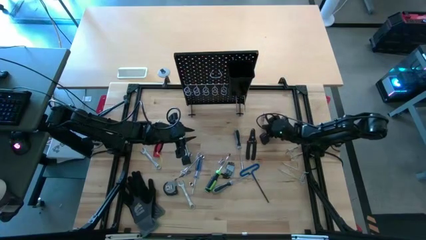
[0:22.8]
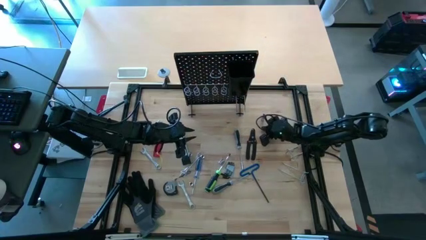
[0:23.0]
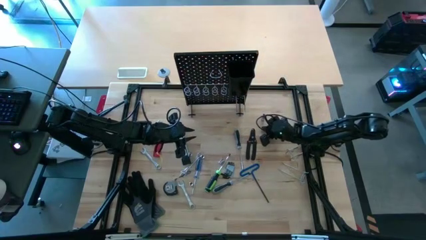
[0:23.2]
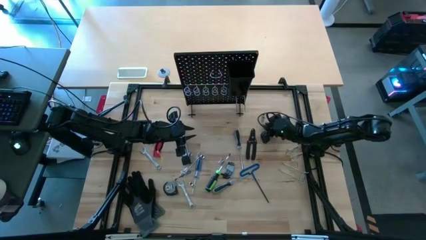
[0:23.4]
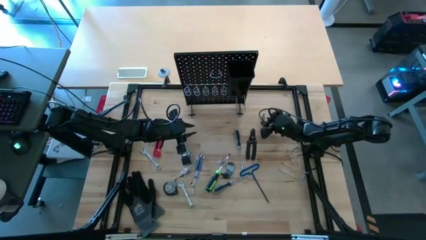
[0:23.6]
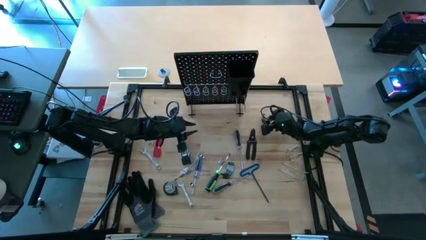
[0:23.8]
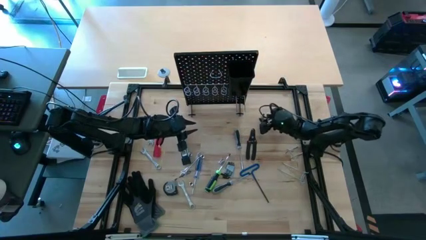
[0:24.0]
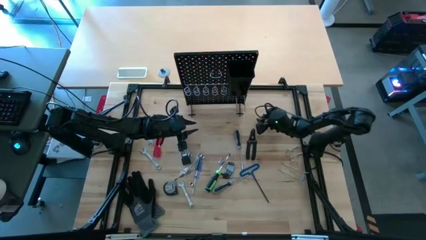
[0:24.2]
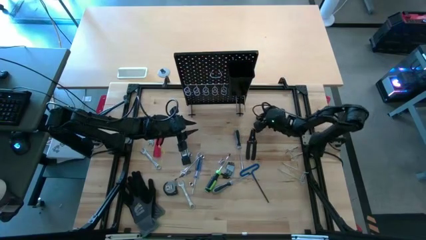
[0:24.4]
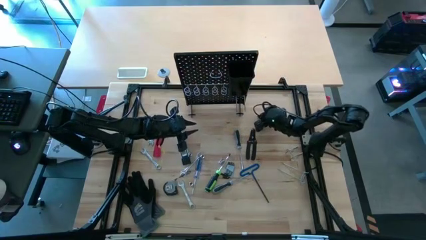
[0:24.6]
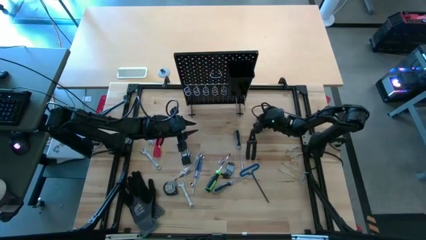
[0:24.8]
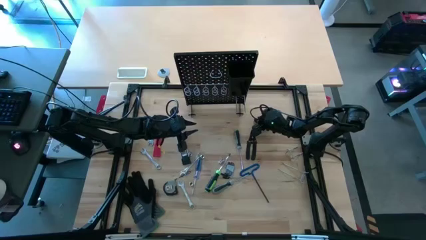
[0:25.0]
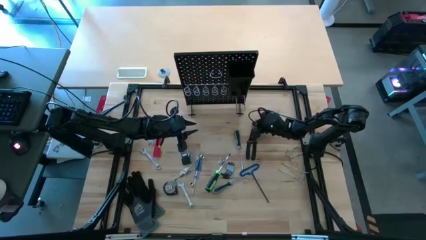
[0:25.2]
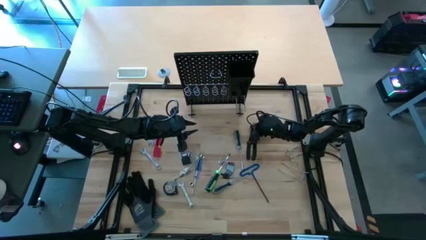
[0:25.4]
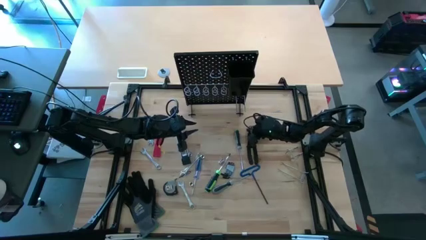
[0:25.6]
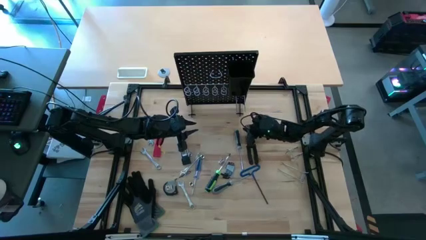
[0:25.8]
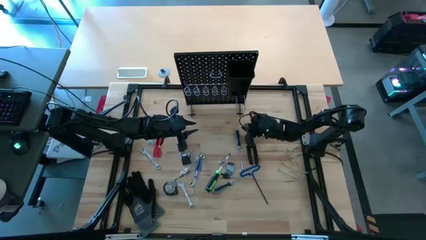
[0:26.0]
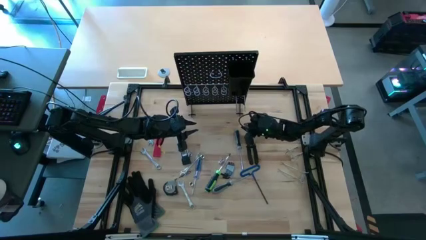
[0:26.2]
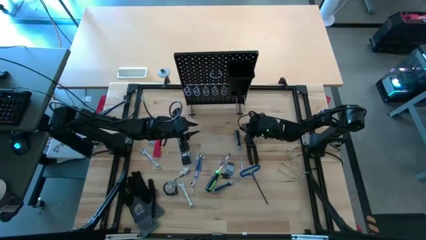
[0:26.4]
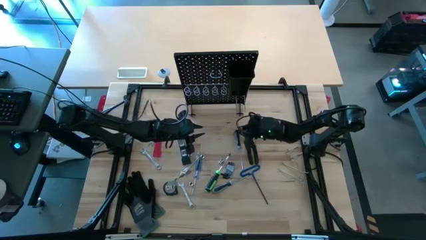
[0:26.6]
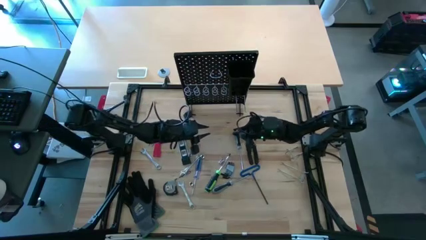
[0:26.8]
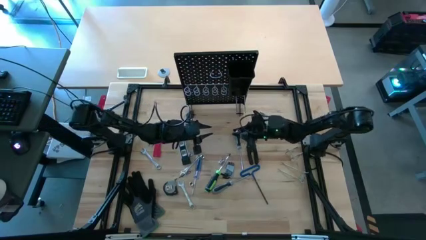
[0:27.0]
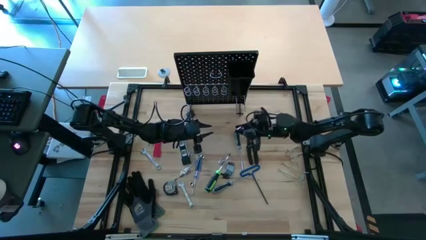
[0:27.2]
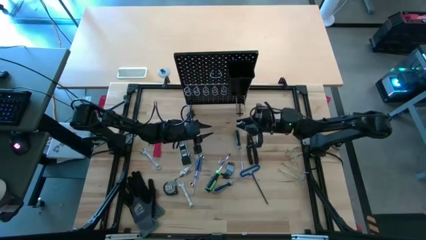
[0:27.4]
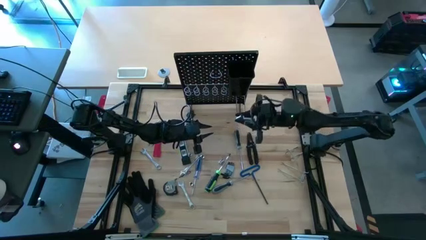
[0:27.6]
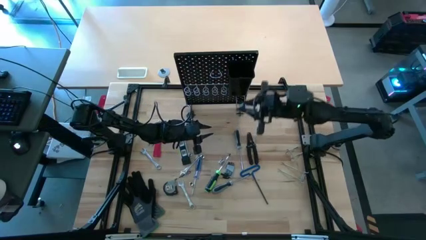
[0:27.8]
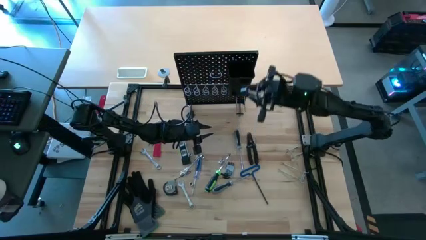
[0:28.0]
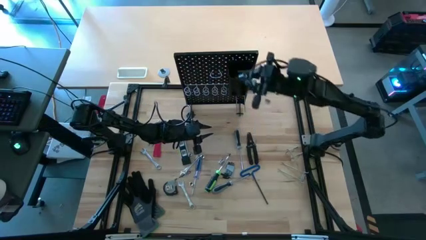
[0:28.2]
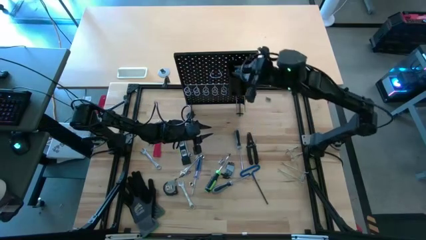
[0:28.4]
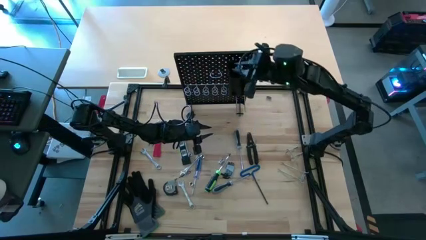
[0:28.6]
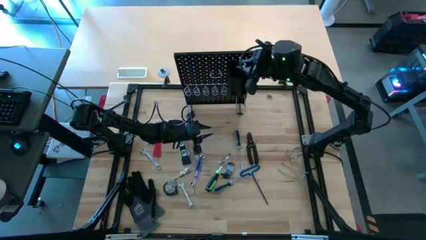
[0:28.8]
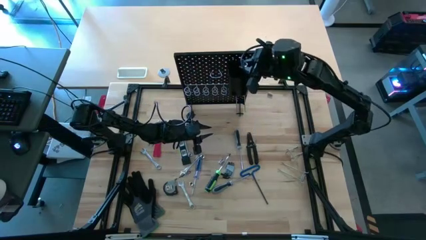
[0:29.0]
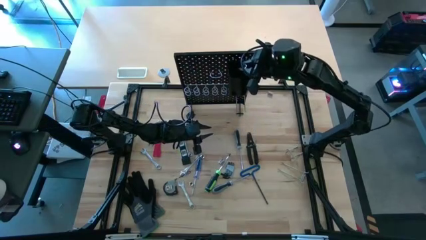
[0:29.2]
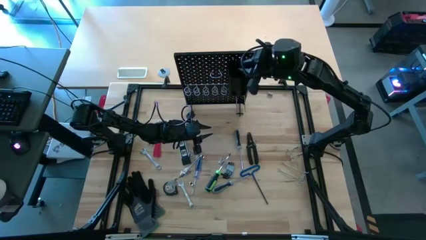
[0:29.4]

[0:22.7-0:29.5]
Task: Hang tools onto peg board
Put the socket wrench into the pegboard bin

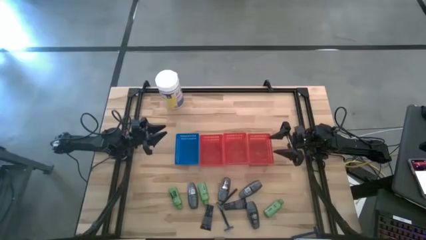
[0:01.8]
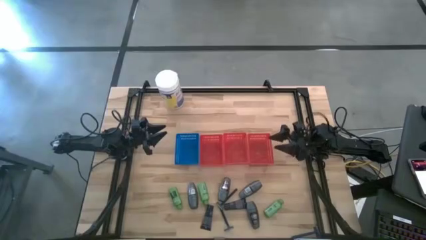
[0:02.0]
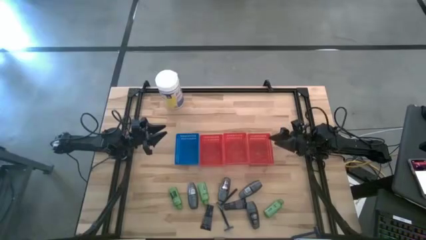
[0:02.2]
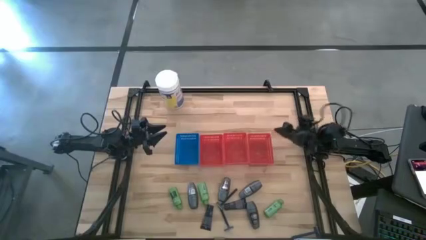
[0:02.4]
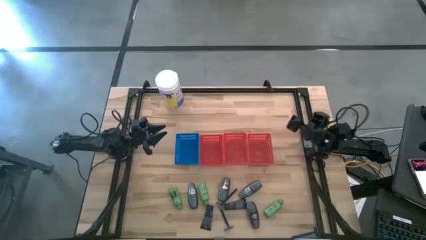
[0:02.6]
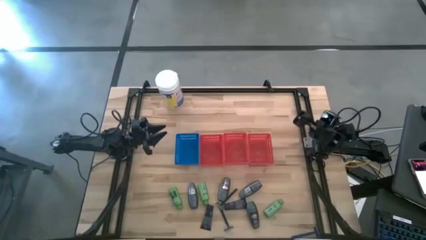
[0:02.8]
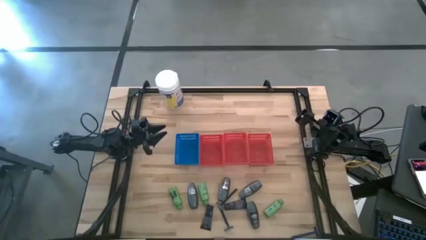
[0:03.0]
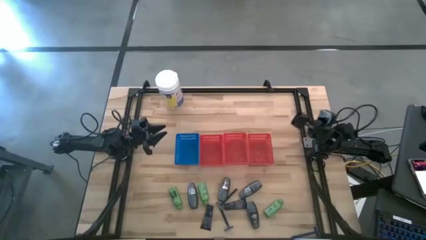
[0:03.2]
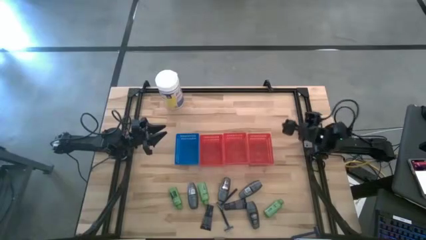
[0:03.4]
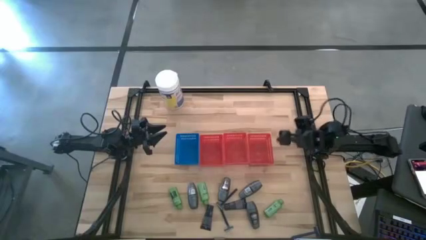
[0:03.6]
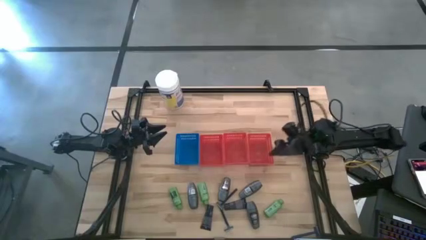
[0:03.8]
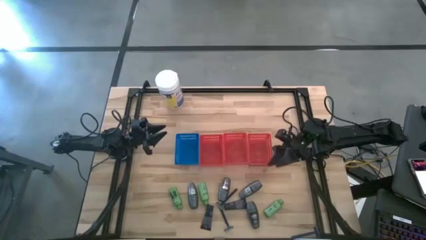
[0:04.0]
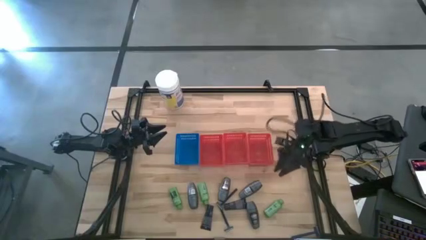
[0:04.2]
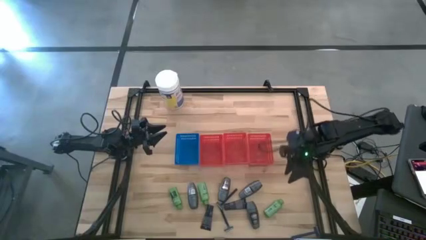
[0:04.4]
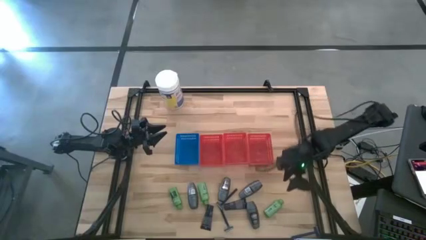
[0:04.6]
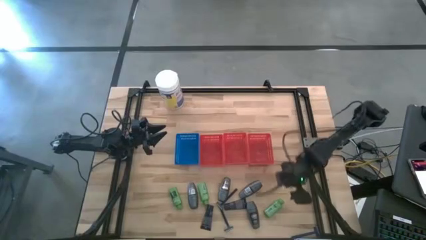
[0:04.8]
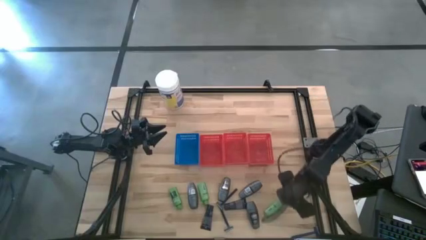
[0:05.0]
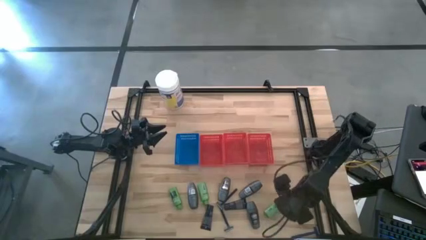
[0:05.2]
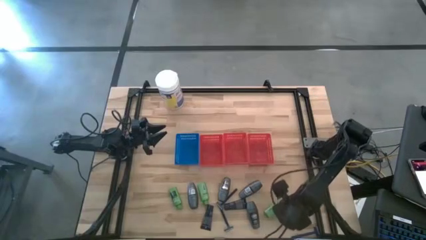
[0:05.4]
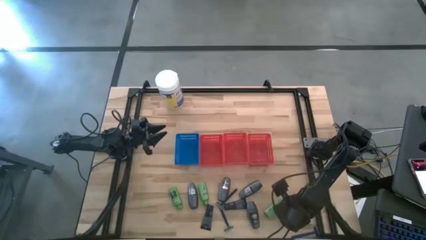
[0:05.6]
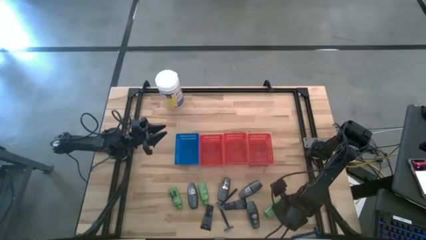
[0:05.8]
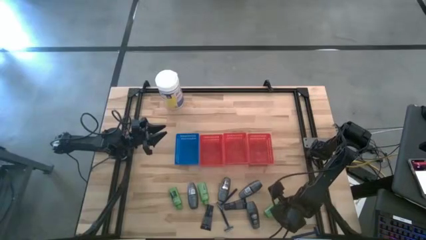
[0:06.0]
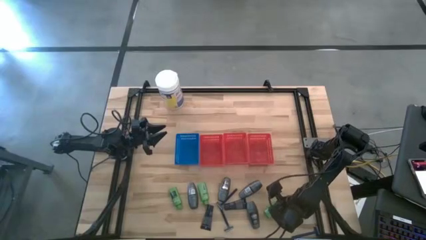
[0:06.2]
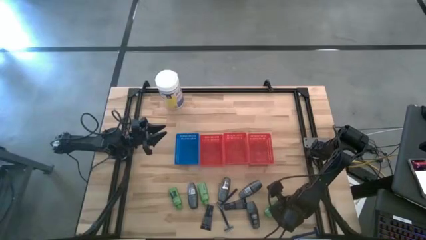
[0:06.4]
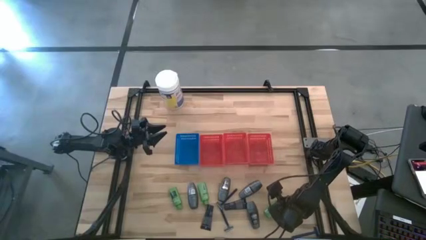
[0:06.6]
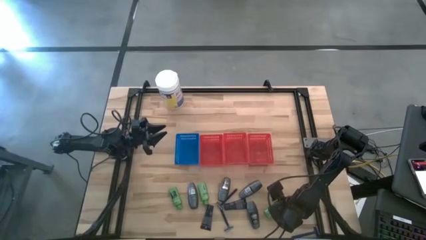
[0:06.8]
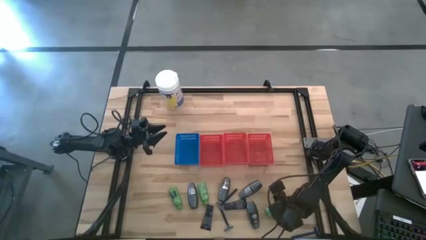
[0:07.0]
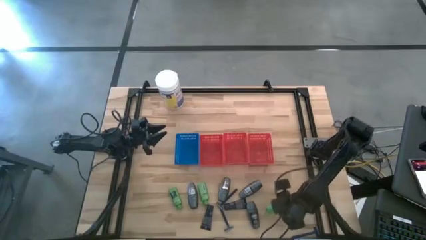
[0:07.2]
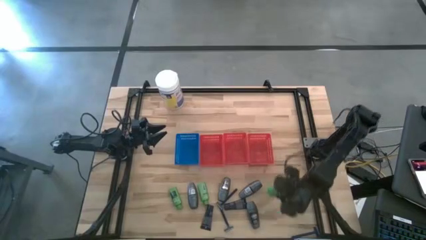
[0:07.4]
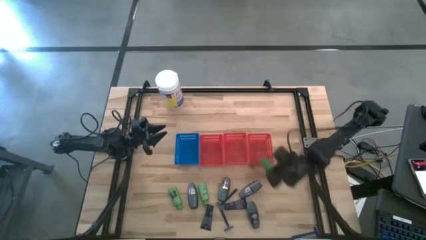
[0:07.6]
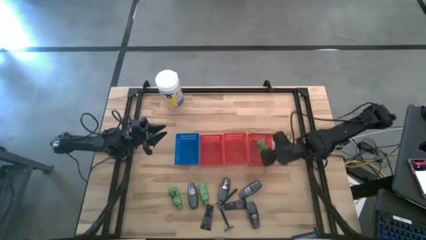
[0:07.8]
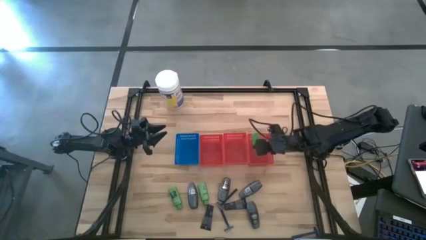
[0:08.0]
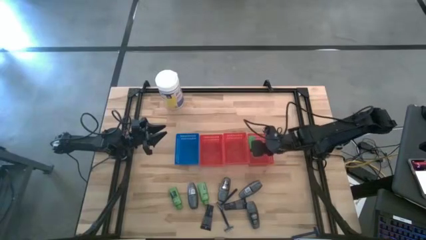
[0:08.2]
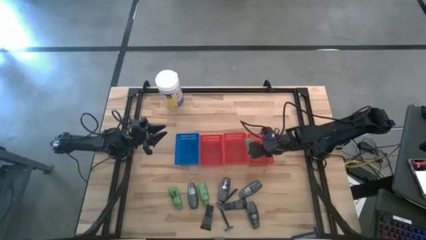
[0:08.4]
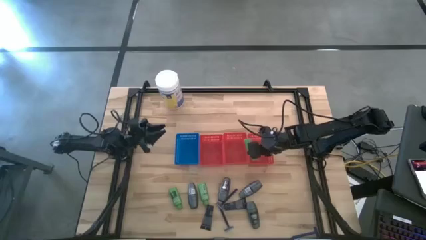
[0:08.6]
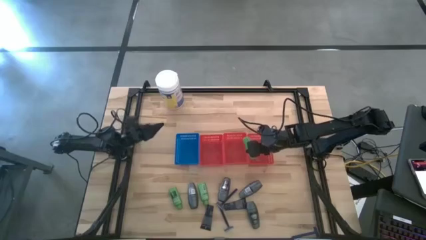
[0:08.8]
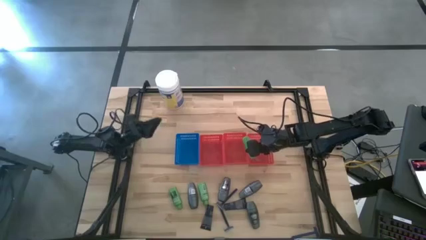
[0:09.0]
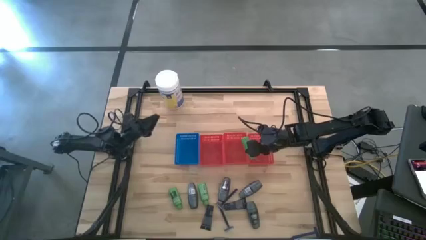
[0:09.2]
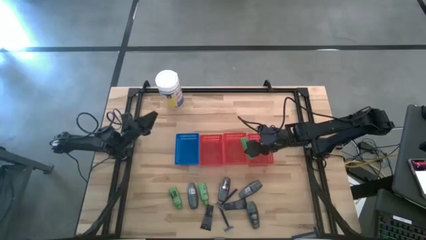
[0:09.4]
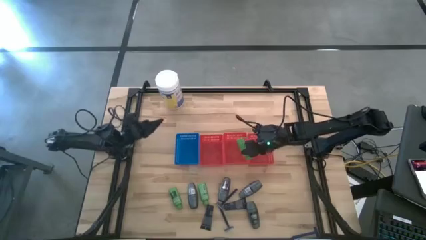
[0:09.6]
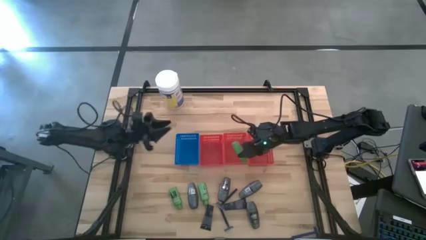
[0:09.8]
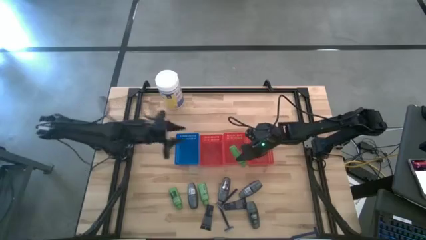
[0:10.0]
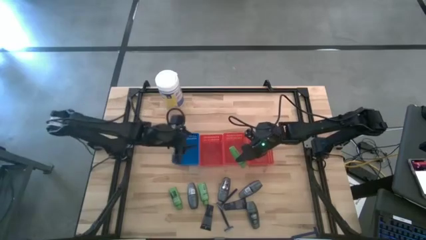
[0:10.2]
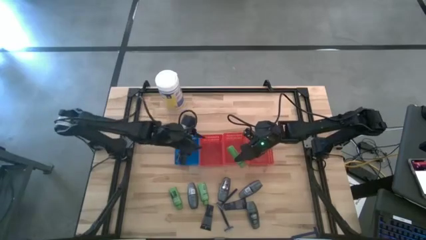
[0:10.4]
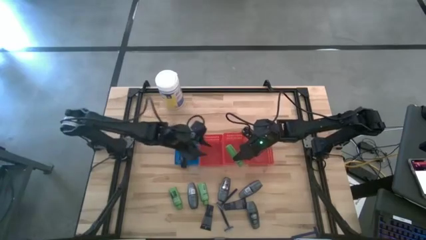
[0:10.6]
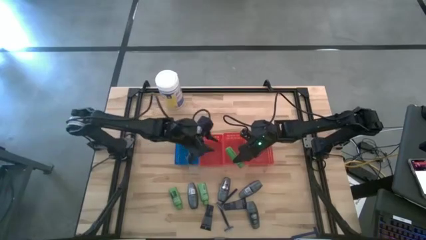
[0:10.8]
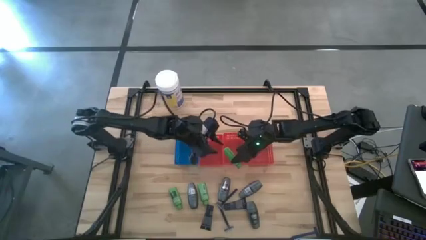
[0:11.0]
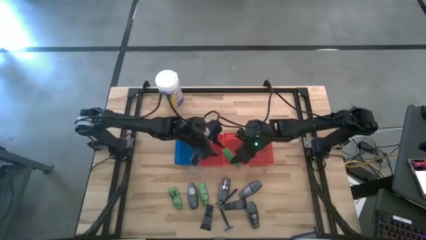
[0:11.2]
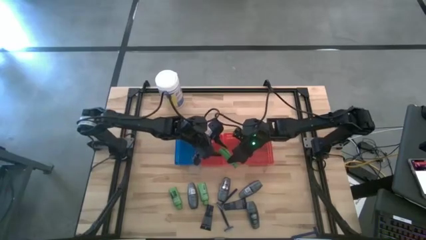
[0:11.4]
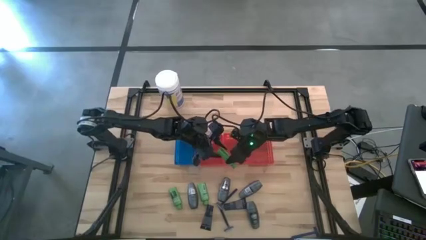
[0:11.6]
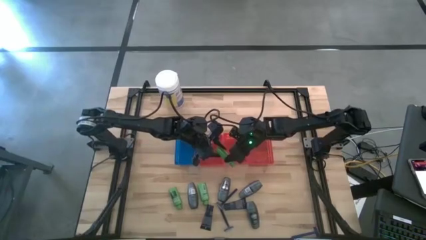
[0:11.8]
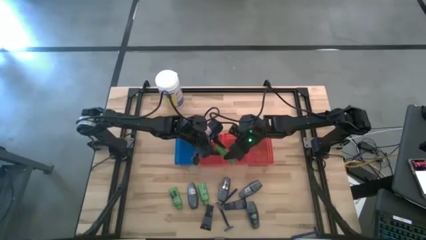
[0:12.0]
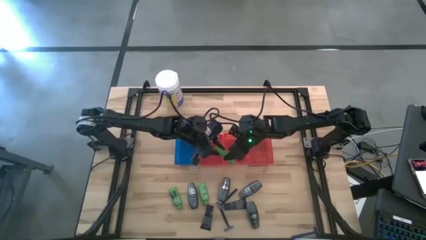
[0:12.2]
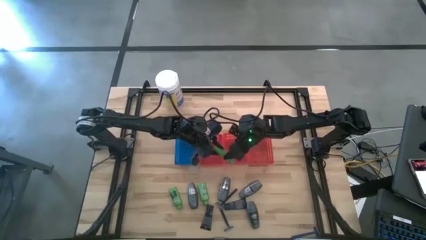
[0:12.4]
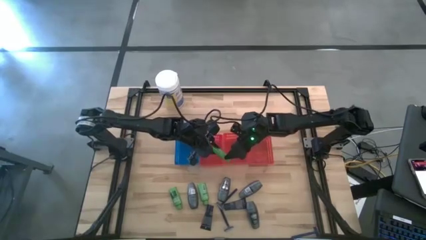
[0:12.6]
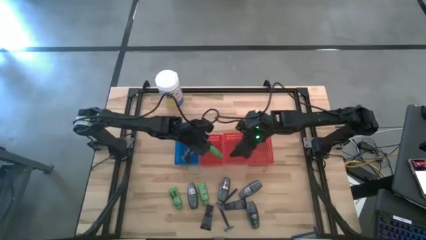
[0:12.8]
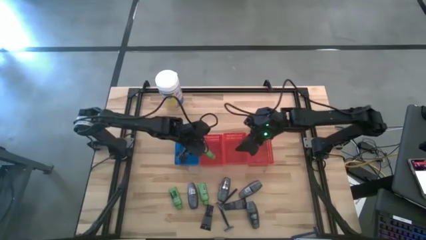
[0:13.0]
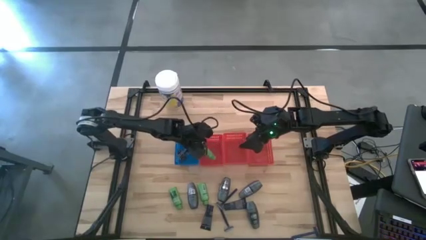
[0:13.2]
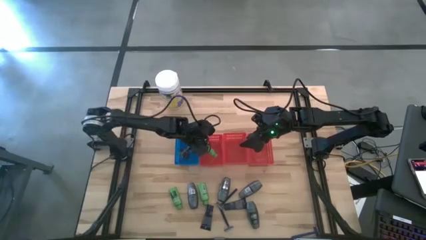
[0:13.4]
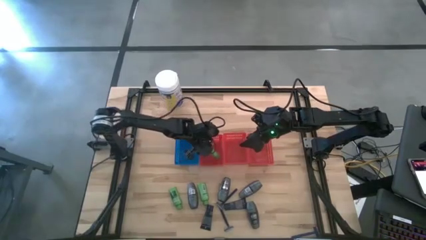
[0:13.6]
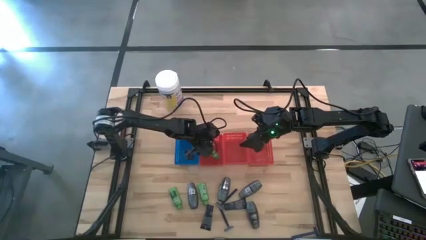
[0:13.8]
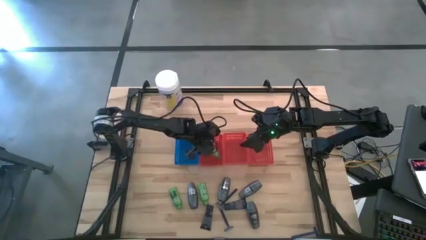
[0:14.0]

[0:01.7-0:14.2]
Task: Pick & Place Travel size toiletries
Put the right green shampoo into the left red basket
